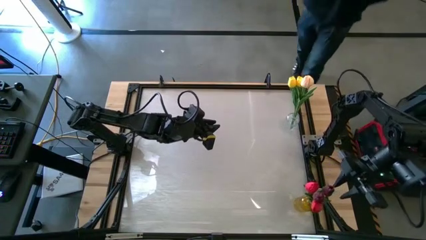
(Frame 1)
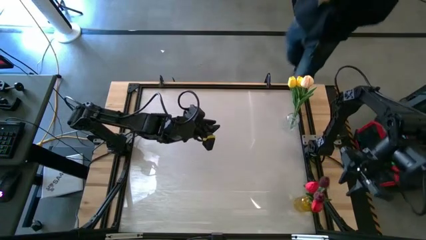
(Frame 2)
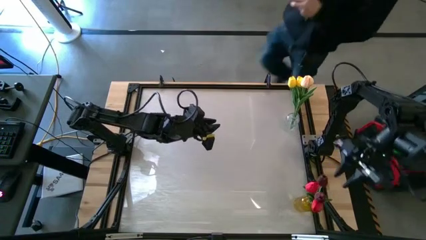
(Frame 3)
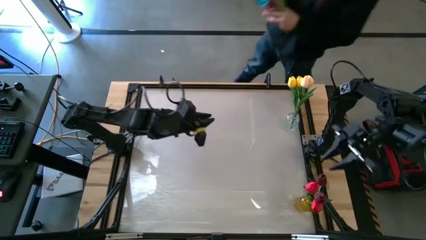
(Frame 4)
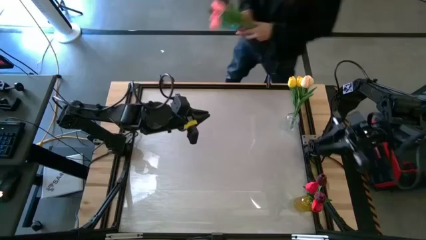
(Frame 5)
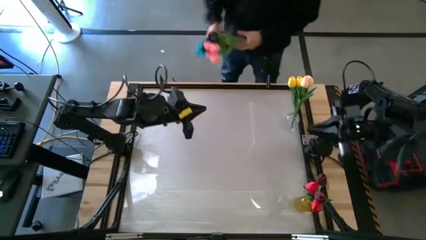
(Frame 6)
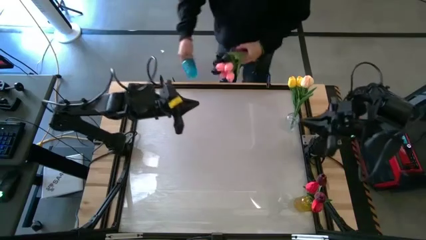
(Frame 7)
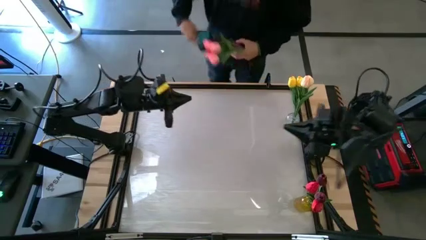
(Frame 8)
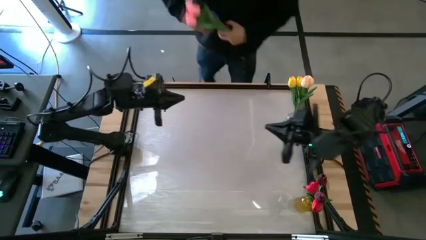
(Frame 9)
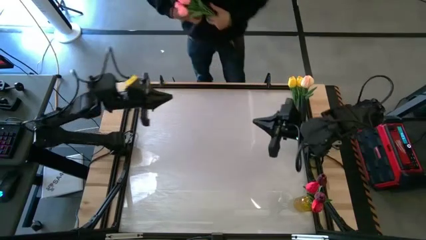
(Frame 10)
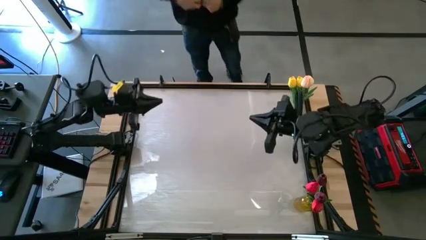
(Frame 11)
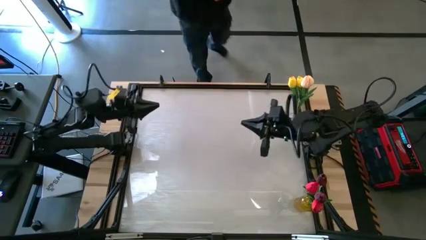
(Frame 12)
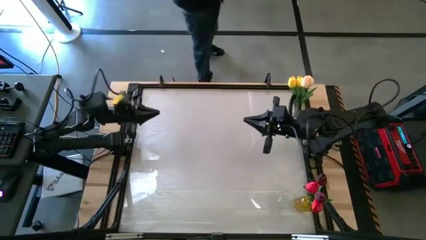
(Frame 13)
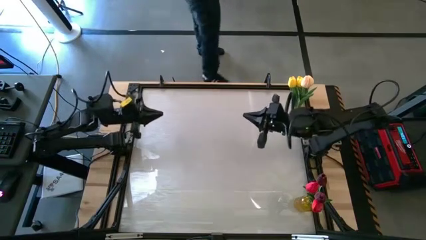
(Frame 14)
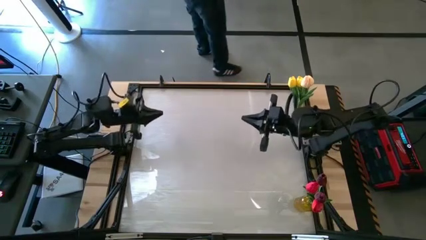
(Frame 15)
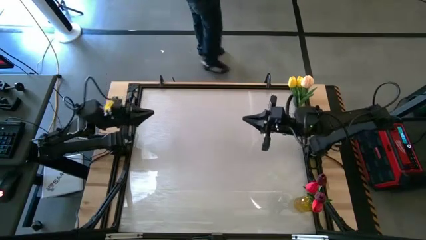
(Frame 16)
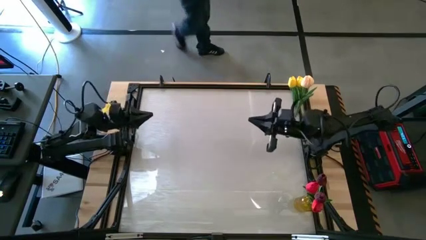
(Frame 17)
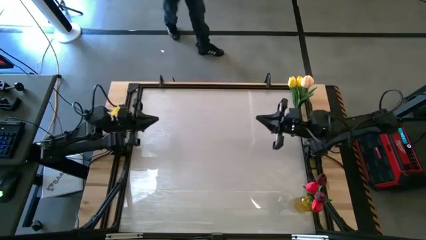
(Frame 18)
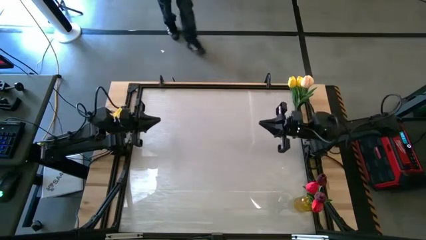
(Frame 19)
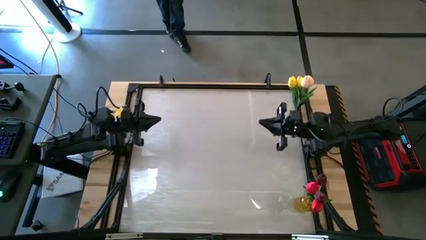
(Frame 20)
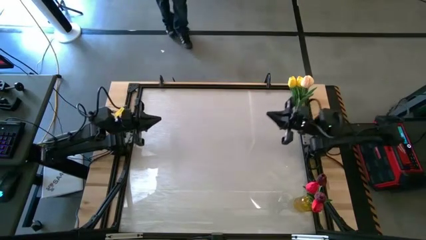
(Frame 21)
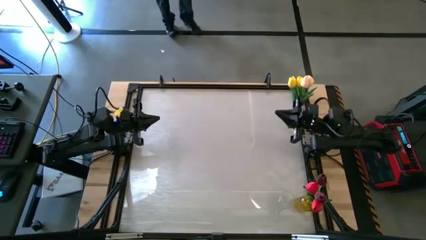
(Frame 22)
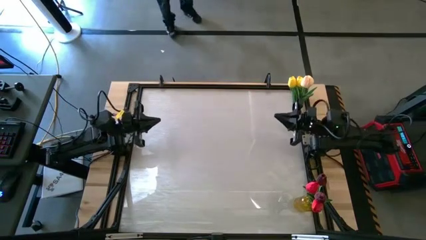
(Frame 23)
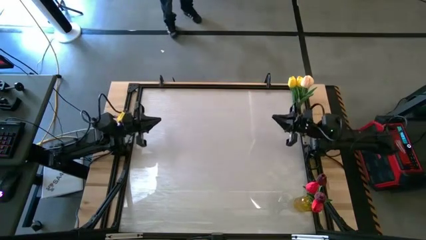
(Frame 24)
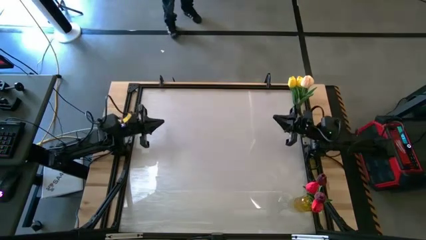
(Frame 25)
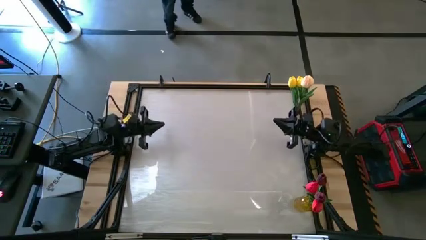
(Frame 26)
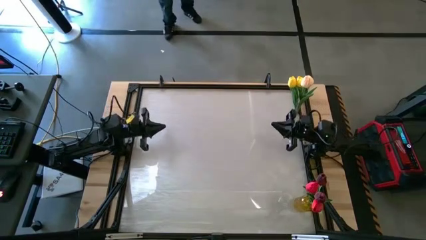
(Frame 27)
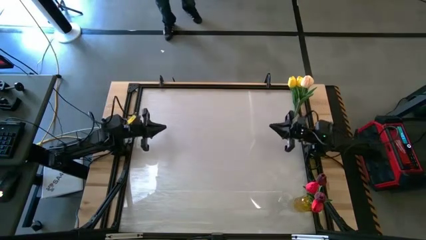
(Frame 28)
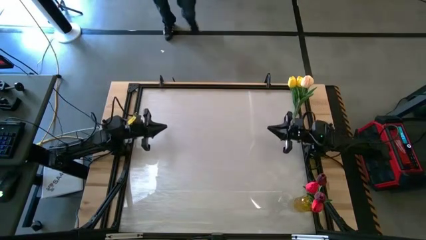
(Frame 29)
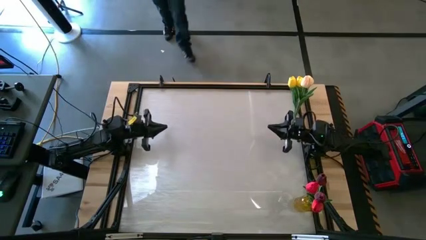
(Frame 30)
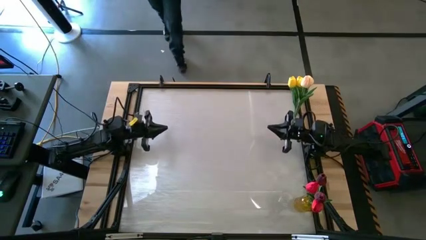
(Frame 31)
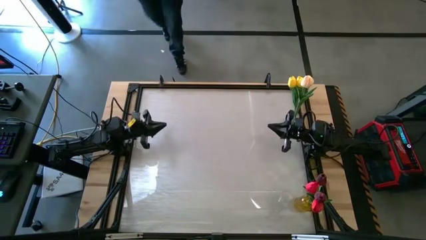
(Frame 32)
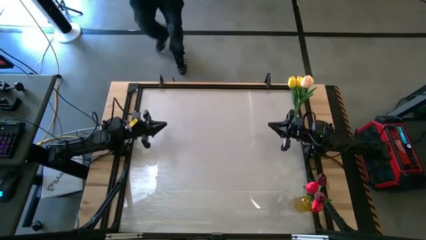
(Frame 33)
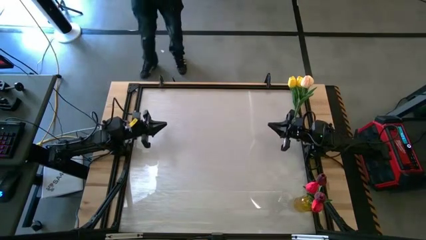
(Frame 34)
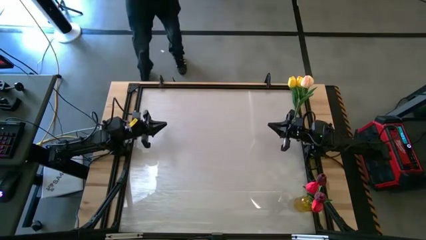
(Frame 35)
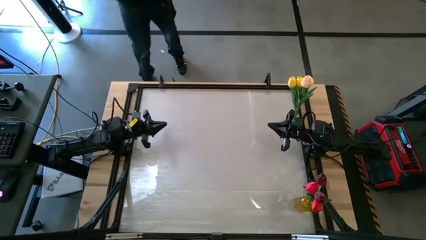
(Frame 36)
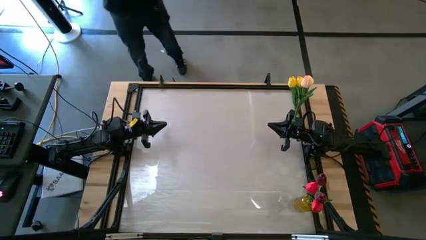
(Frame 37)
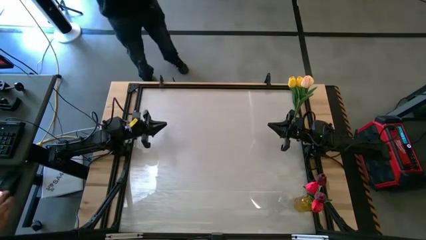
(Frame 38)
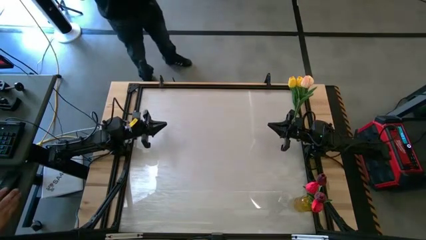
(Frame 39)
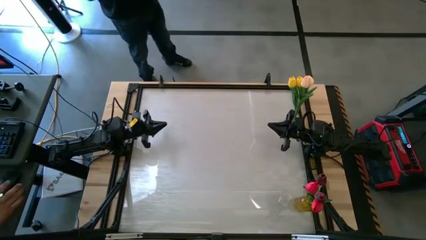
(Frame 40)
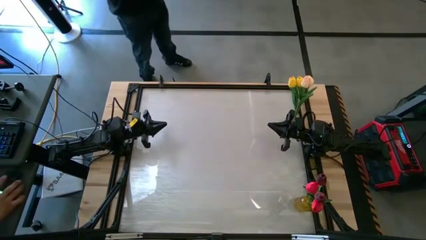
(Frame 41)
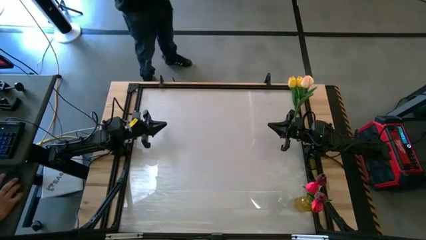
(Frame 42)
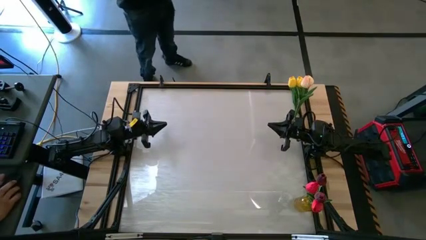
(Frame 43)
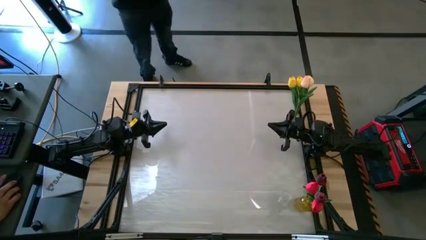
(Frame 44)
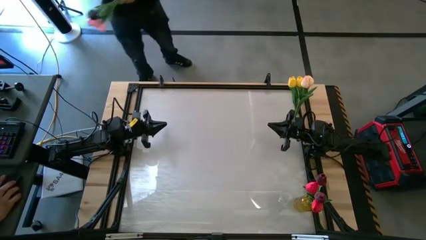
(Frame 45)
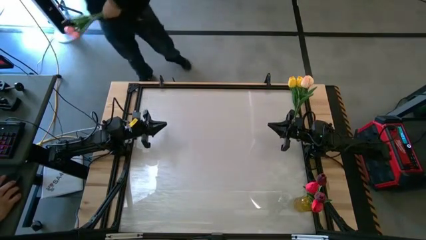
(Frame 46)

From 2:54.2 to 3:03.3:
Task: Sort flowers into vase by color
Return to Home Position

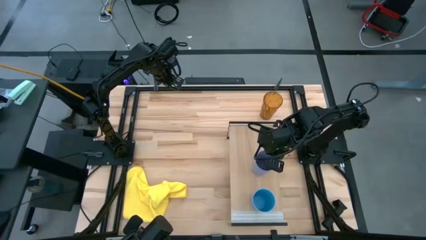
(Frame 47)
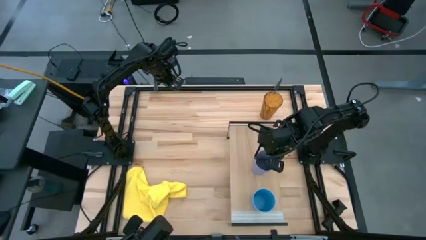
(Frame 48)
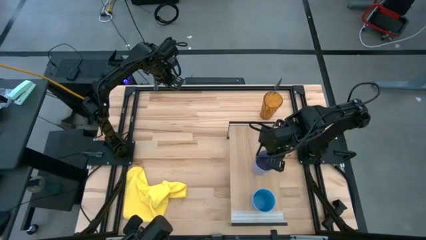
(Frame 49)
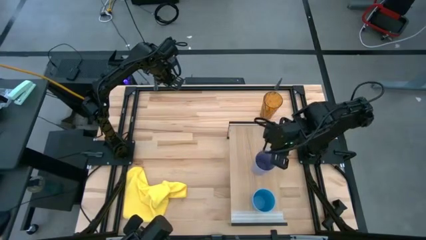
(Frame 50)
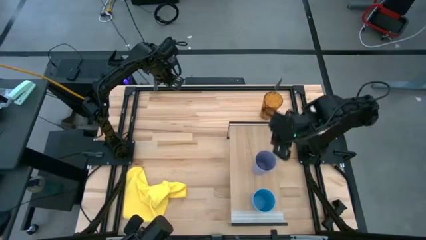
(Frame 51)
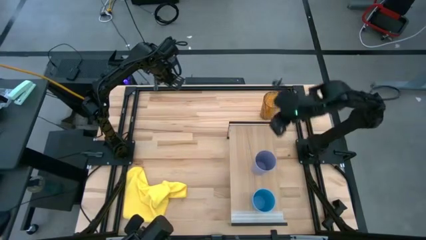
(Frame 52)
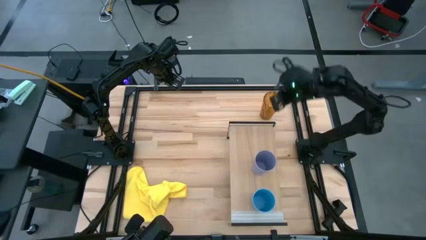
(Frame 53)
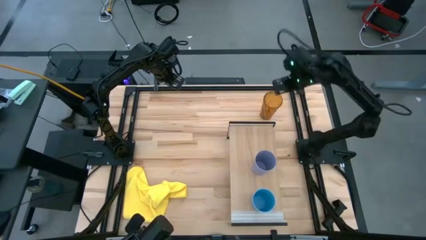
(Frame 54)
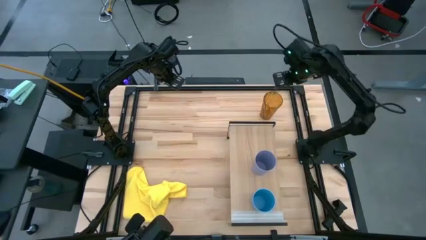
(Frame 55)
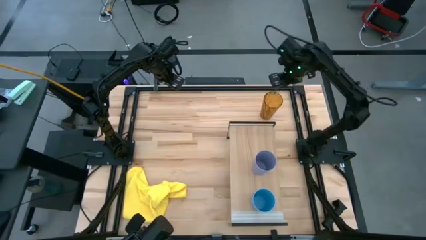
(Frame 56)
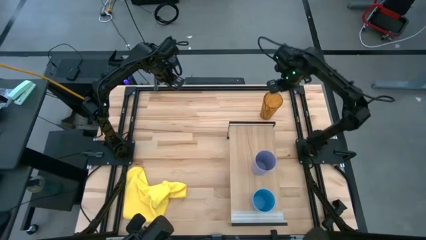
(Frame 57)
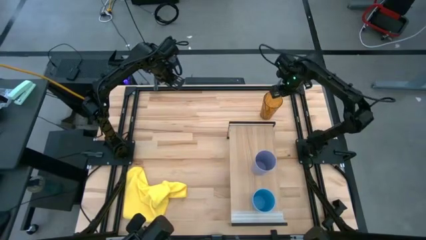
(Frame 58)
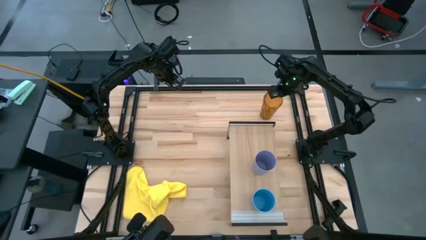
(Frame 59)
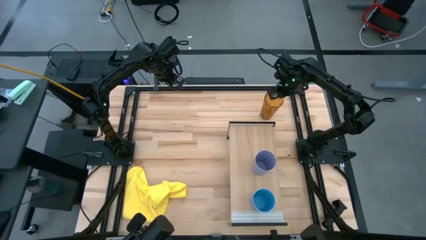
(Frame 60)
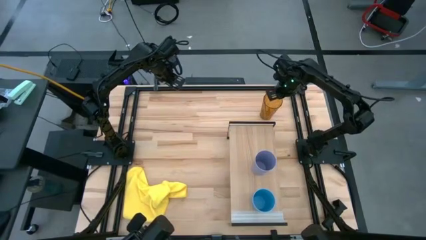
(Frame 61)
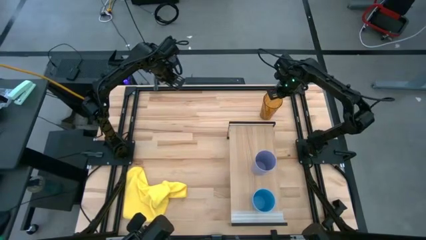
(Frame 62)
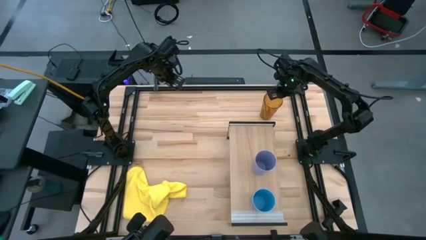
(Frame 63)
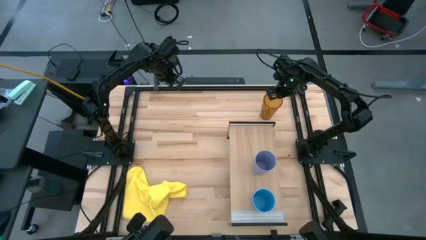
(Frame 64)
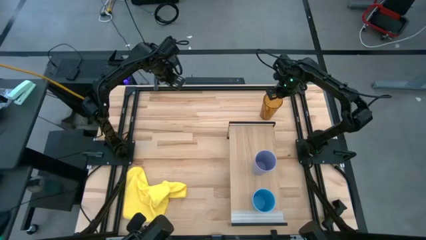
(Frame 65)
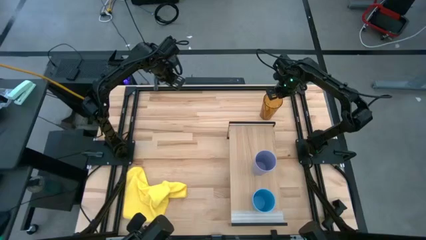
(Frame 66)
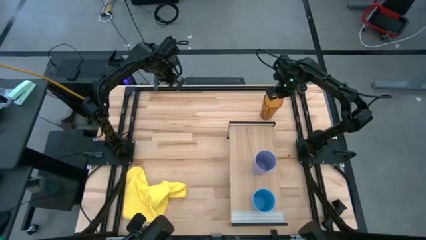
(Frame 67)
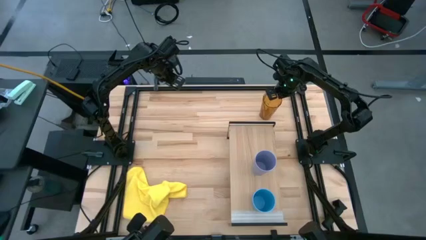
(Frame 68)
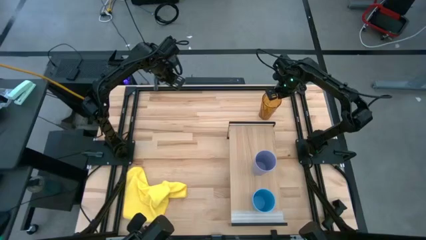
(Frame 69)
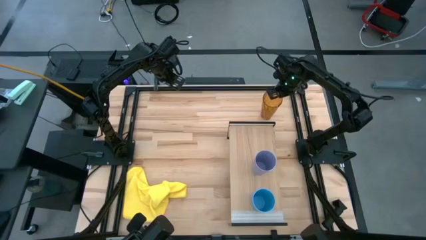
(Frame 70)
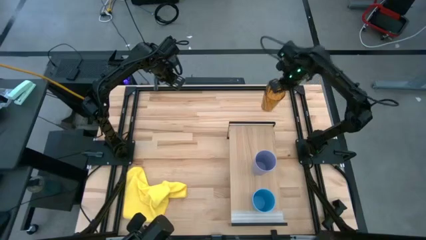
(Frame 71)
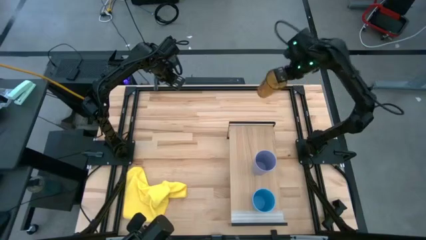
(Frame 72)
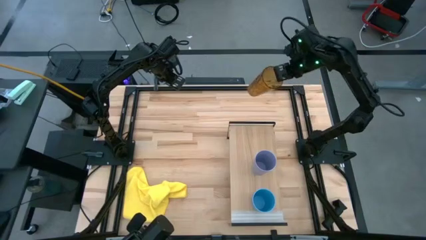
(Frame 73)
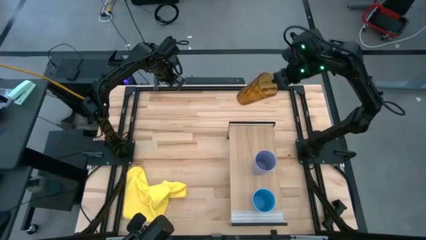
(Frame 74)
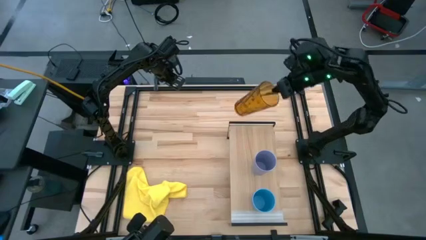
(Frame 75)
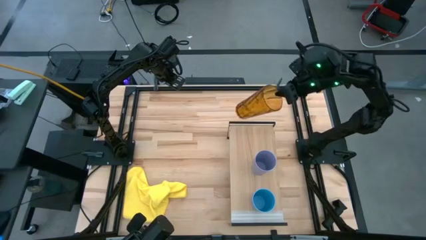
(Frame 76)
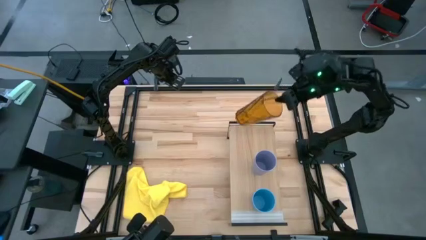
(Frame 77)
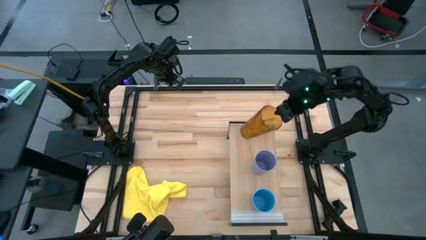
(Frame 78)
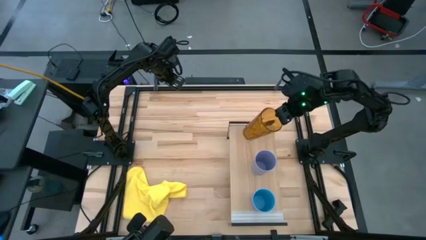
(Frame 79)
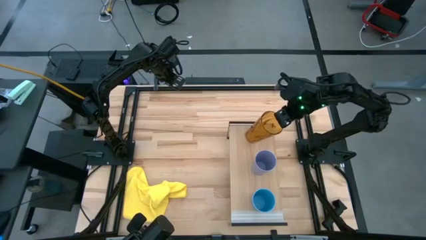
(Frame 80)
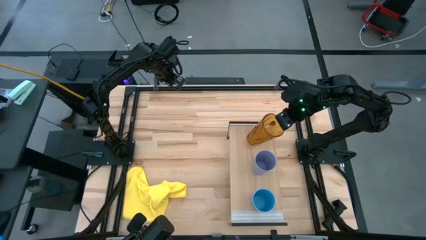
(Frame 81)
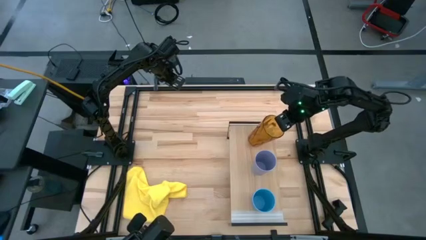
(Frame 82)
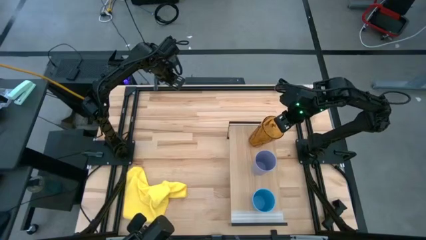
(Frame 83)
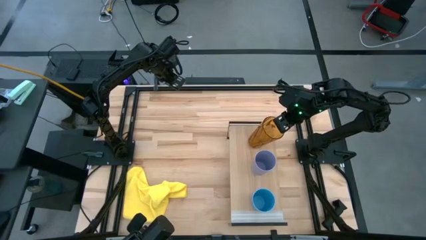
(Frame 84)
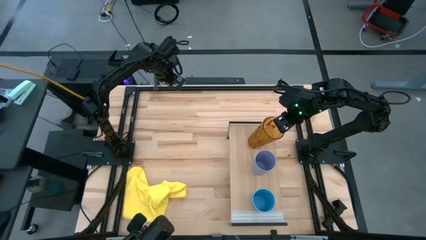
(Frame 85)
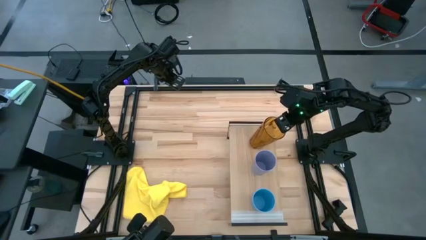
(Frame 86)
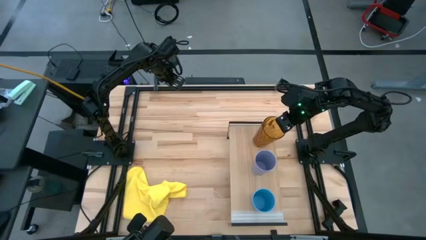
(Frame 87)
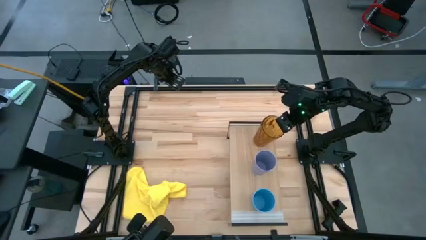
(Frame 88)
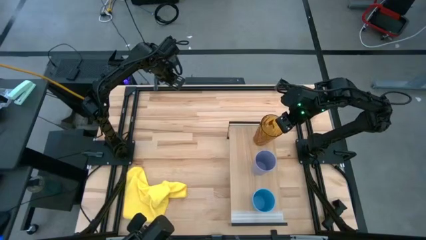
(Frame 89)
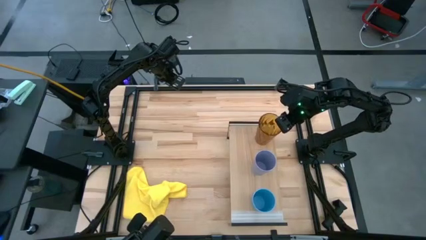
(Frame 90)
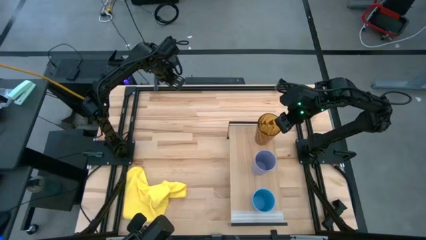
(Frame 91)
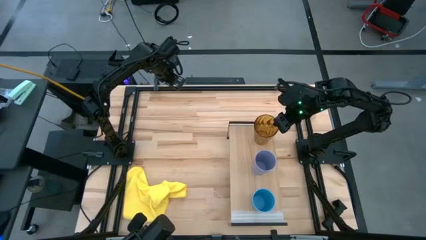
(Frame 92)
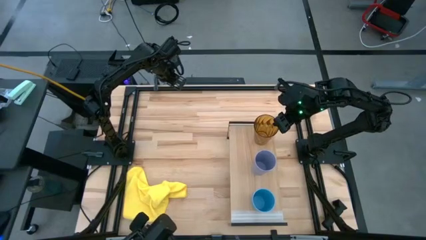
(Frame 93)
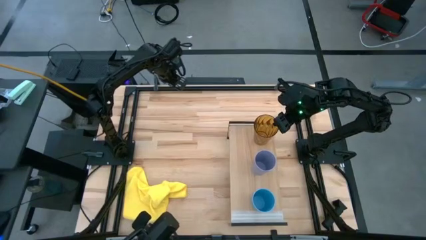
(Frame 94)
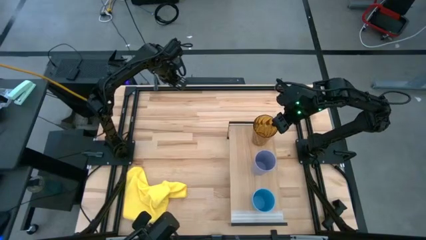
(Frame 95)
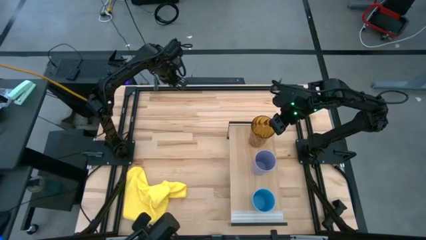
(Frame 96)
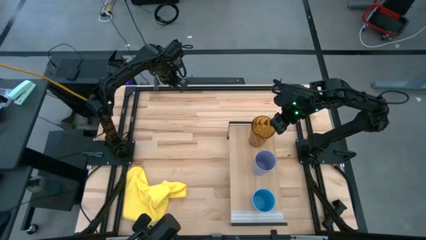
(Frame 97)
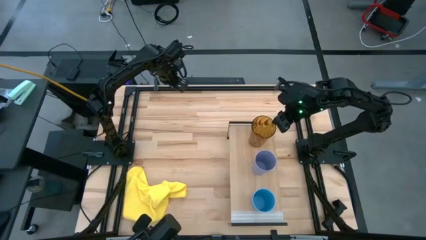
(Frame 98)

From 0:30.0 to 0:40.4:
Task: Stack small to large cups/mugs on shelf
Put the orange crystal cup onto the shelf
